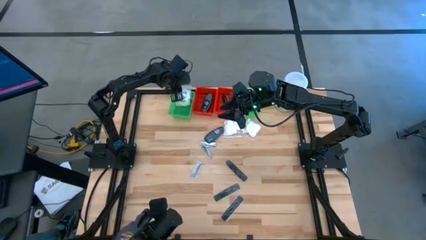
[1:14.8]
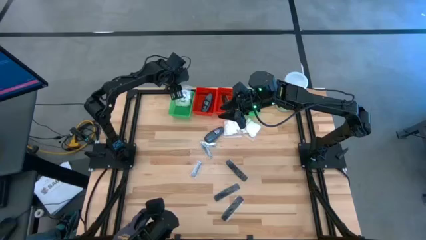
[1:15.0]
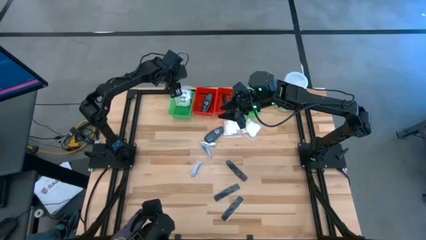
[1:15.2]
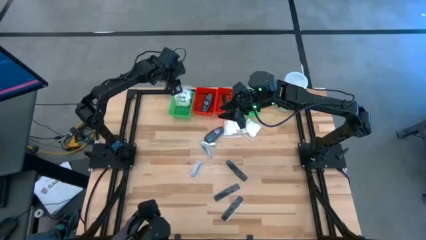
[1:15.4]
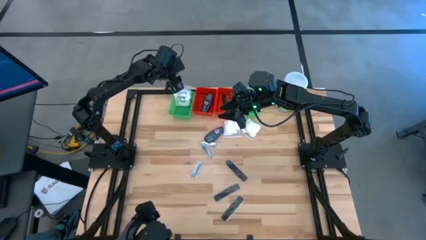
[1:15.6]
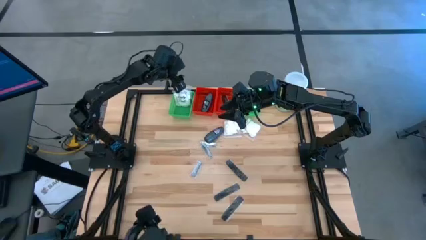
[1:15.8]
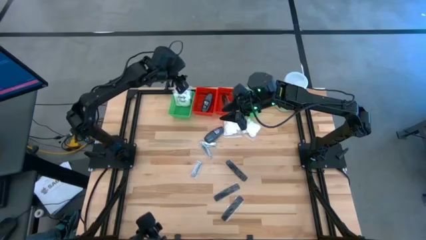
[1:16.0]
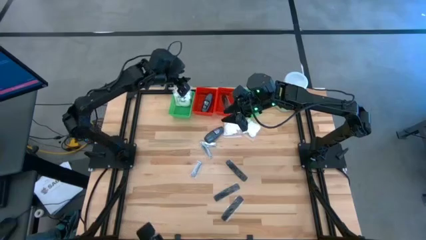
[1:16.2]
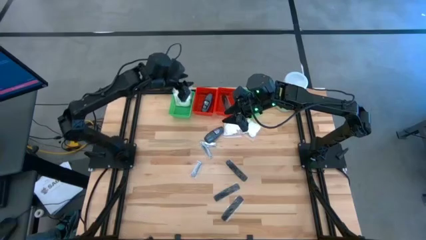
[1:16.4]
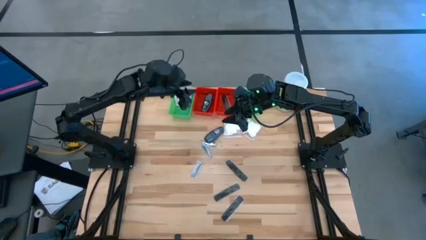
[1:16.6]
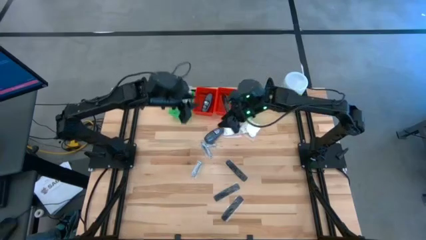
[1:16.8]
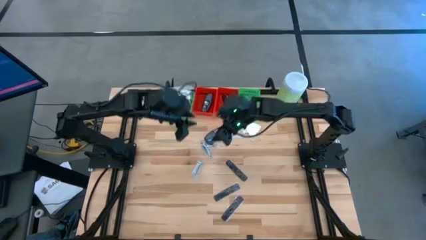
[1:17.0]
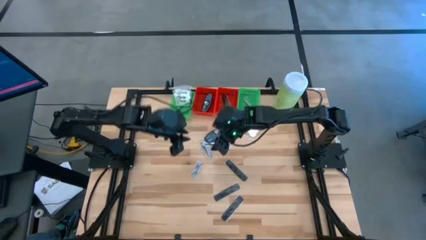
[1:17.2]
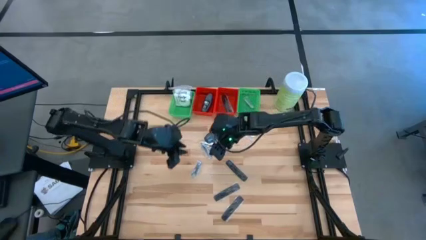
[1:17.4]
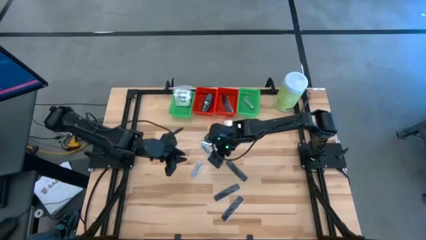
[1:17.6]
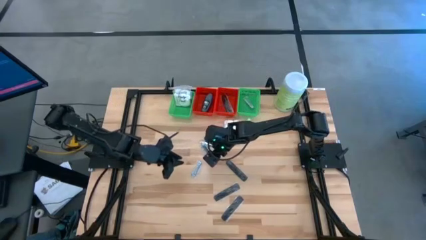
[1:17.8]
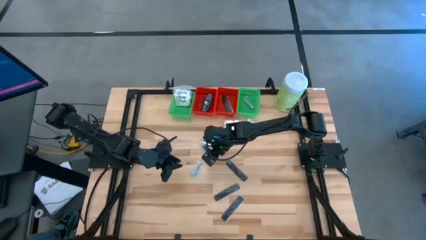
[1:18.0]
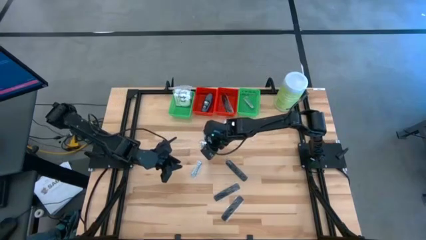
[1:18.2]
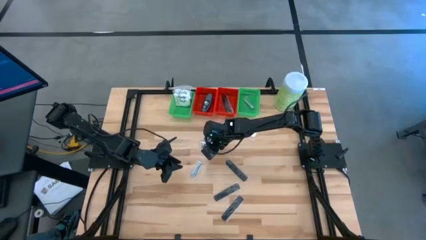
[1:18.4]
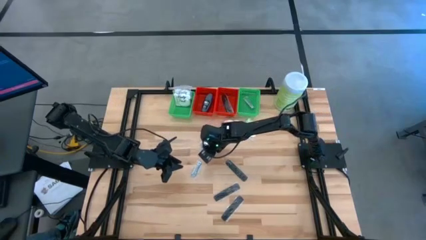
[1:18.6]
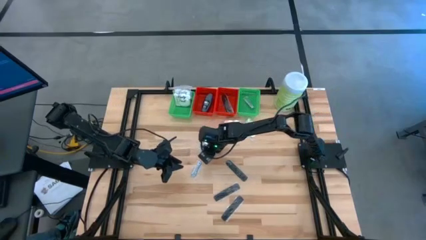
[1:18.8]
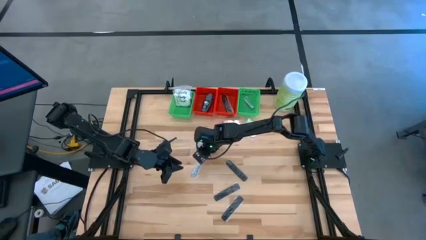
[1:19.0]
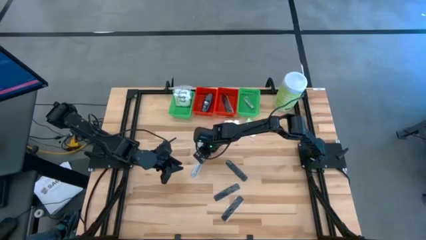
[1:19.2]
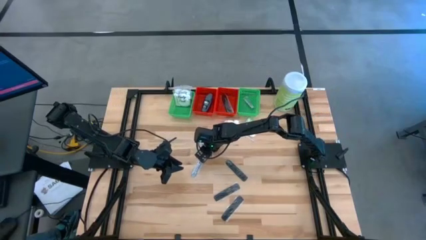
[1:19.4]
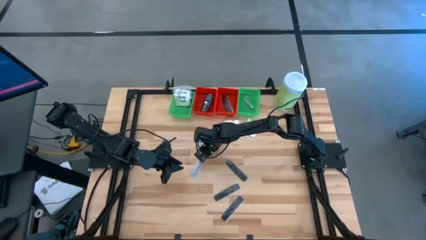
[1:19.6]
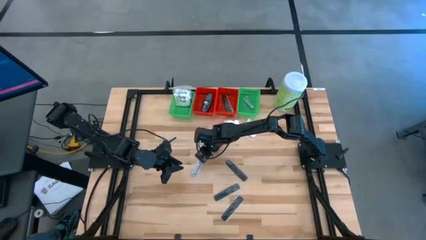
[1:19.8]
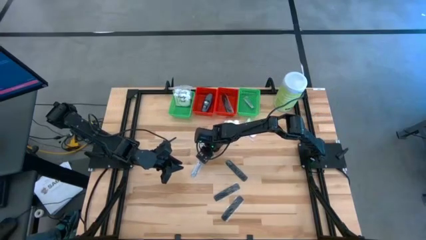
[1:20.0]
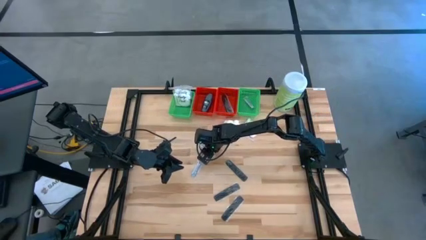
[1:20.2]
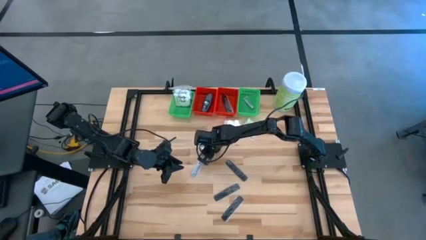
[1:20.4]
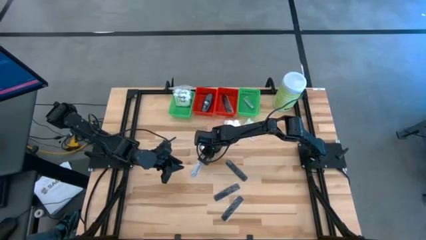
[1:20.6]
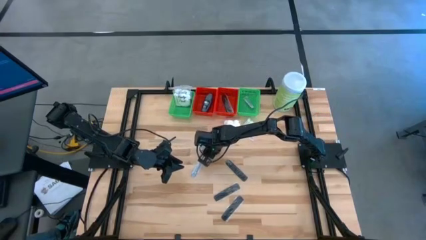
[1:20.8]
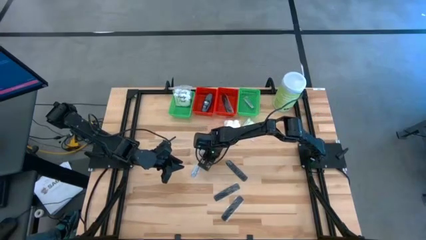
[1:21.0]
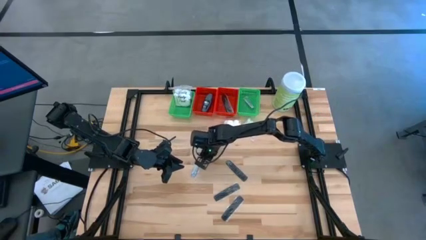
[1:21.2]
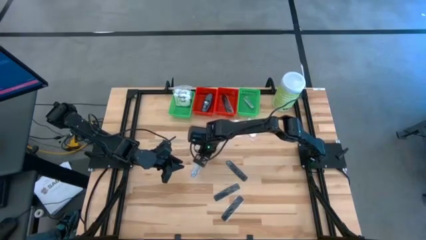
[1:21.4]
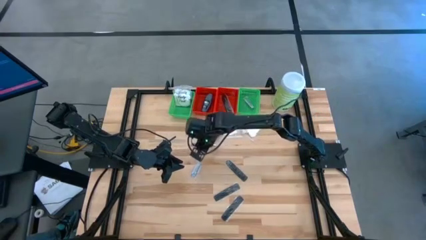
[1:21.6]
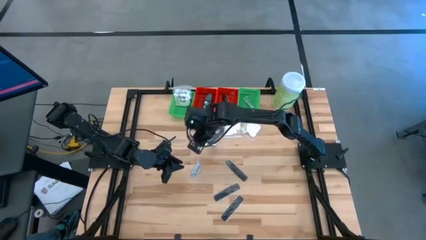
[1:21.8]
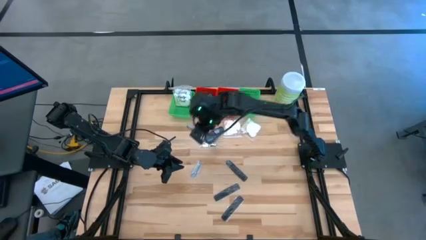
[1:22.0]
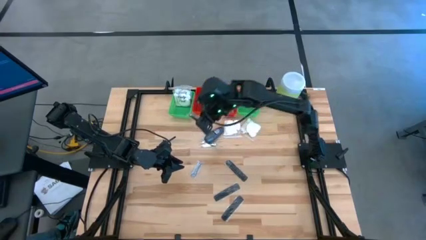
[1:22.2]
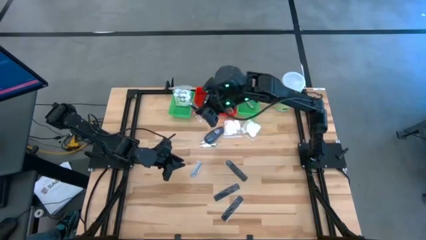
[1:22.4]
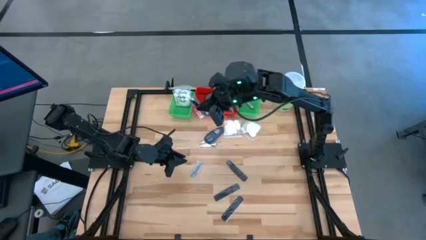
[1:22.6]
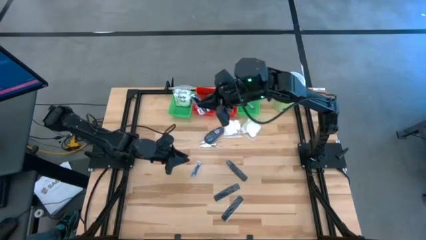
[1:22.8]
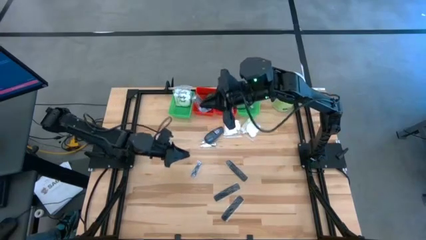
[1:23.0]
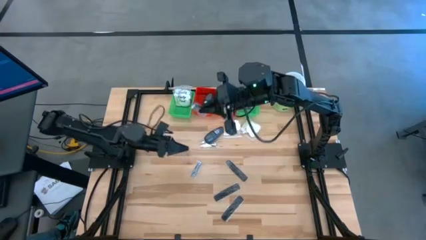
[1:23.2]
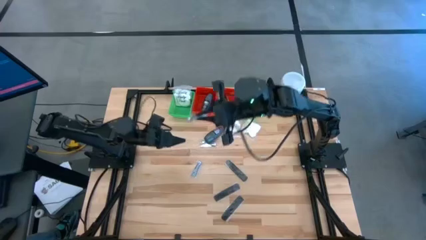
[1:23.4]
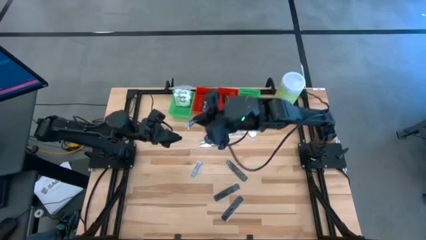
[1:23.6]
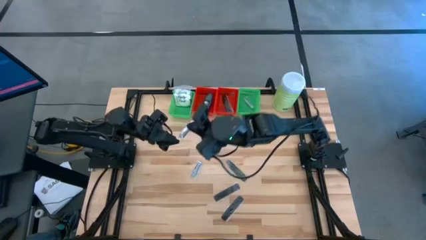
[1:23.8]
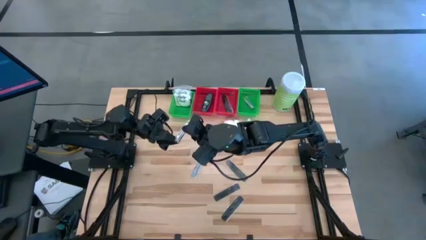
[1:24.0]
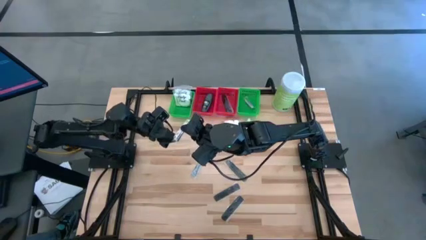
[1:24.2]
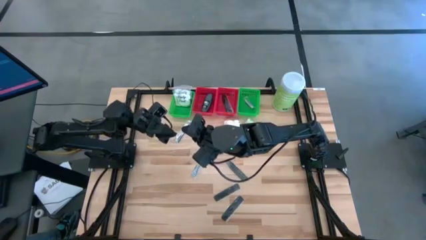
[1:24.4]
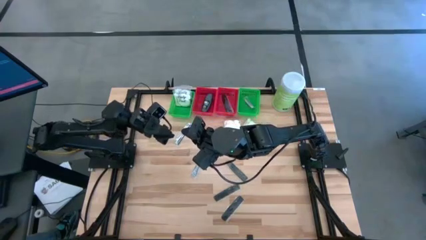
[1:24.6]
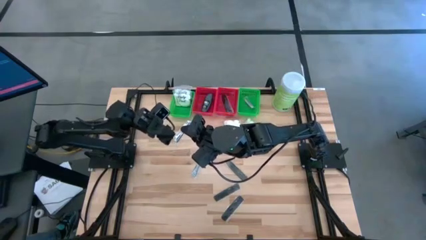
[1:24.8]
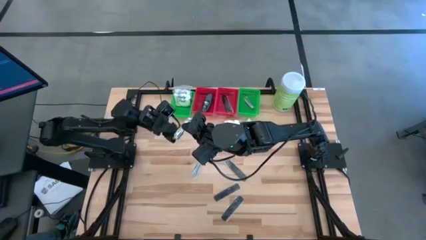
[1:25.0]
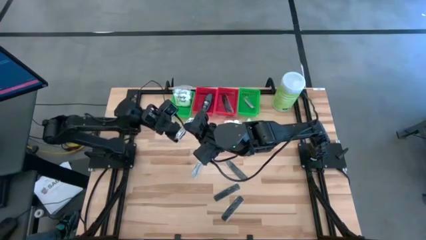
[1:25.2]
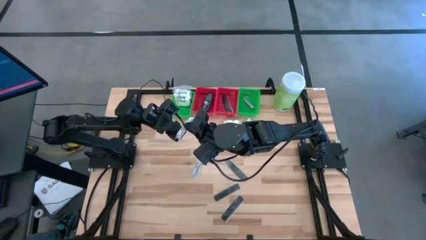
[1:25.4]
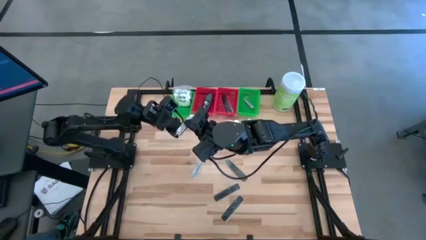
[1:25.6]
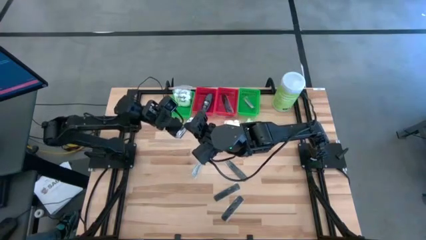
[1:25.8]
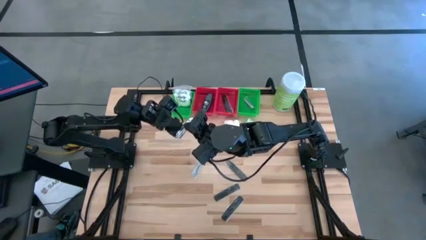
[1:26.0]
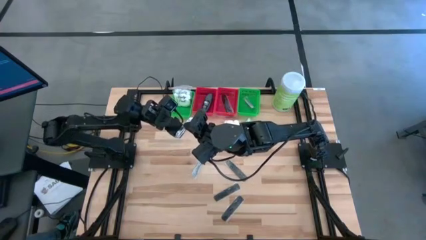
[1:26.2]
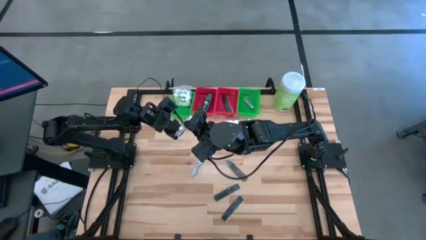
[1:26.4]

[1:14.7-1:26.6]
Task: Pick & Place Travel size toiletries
Put the nail cutter into the right green basket

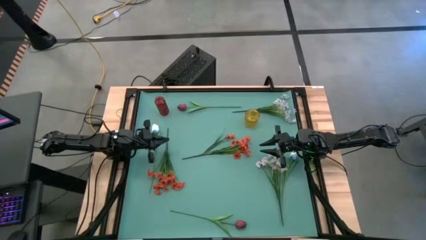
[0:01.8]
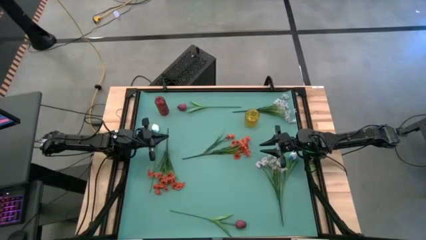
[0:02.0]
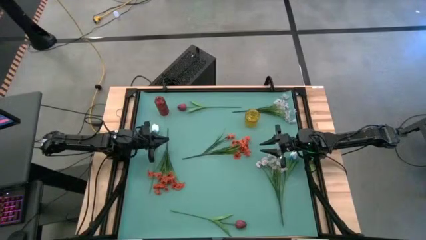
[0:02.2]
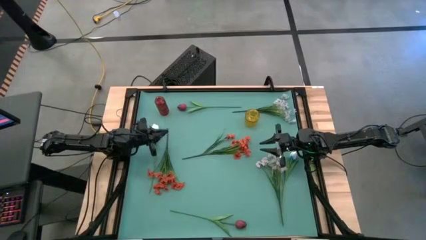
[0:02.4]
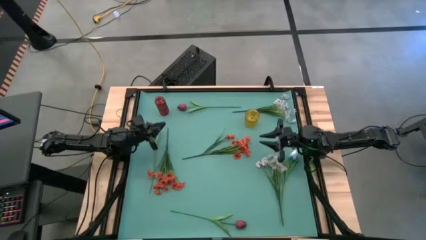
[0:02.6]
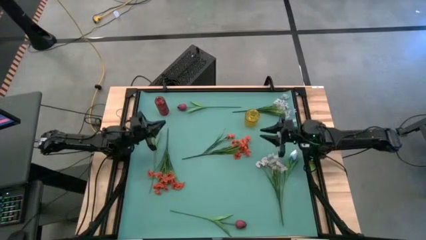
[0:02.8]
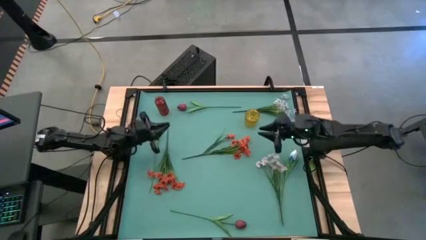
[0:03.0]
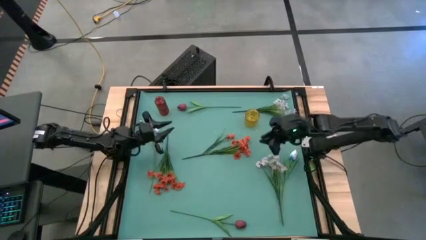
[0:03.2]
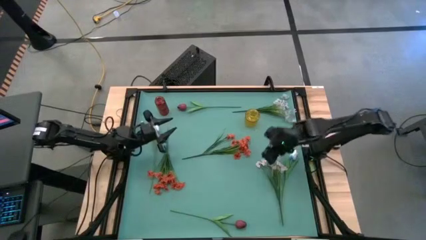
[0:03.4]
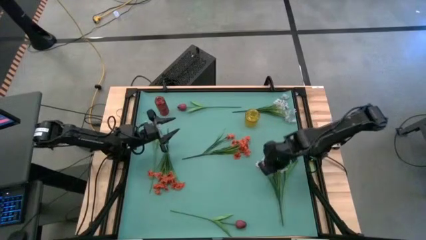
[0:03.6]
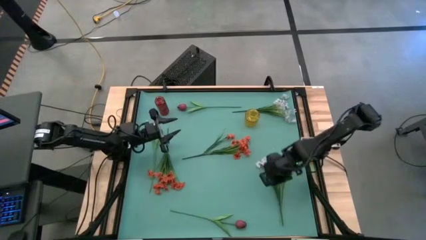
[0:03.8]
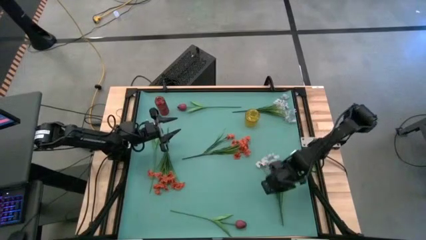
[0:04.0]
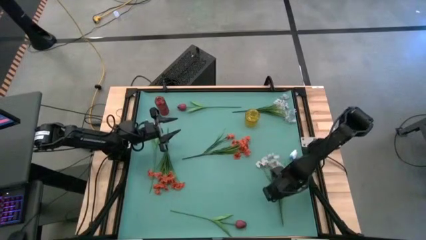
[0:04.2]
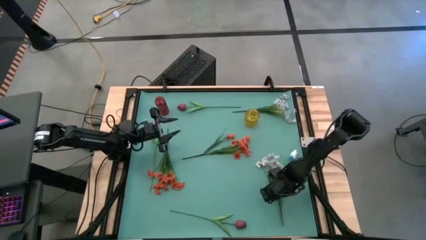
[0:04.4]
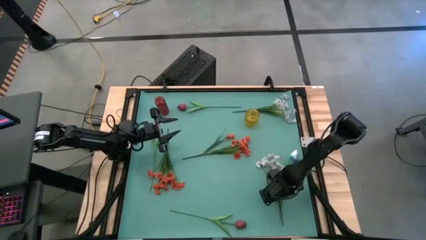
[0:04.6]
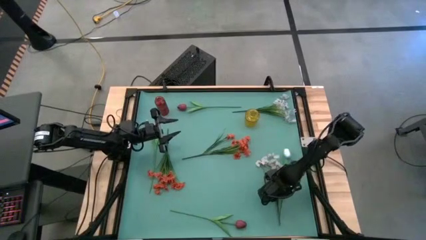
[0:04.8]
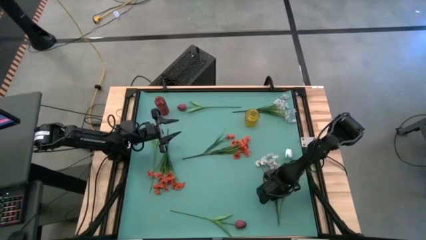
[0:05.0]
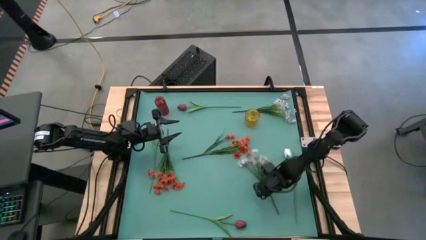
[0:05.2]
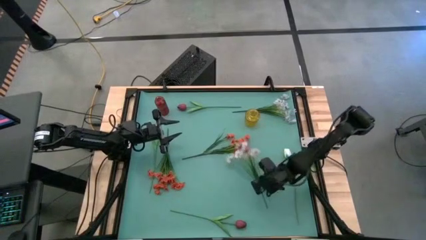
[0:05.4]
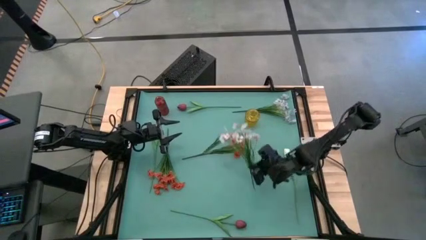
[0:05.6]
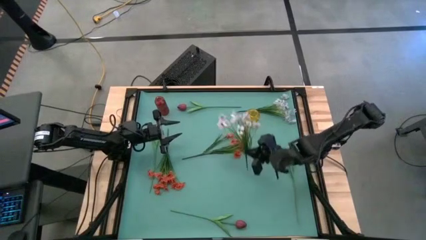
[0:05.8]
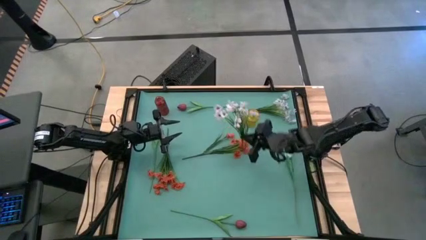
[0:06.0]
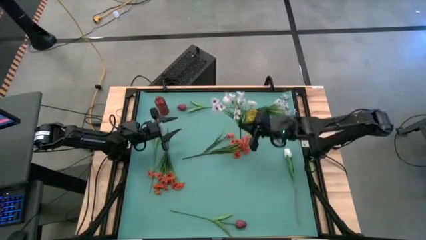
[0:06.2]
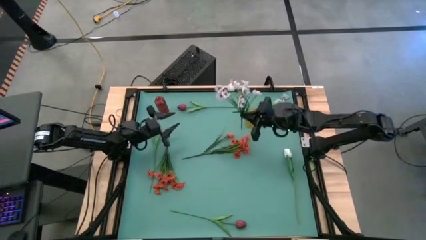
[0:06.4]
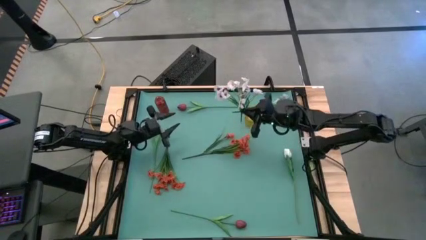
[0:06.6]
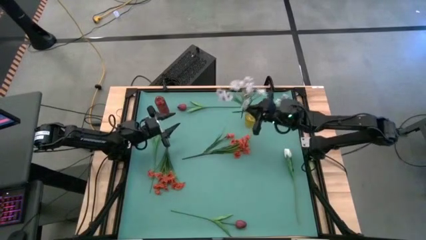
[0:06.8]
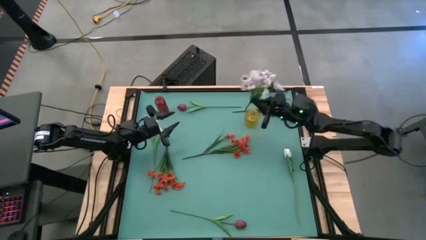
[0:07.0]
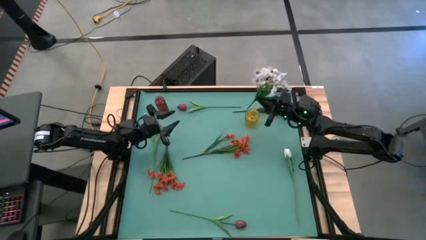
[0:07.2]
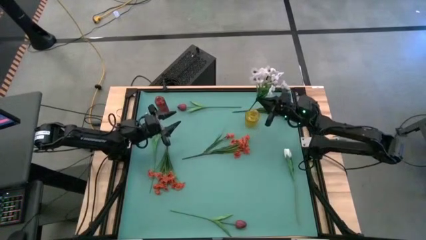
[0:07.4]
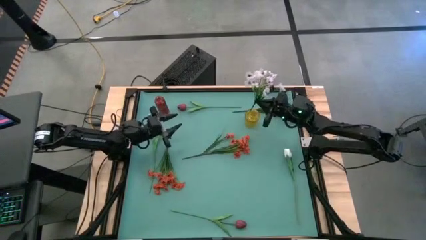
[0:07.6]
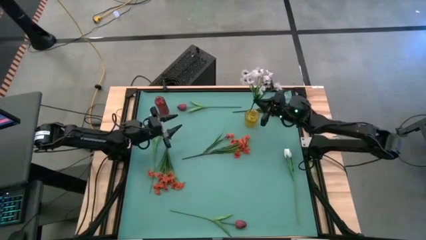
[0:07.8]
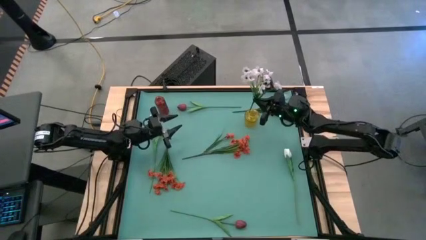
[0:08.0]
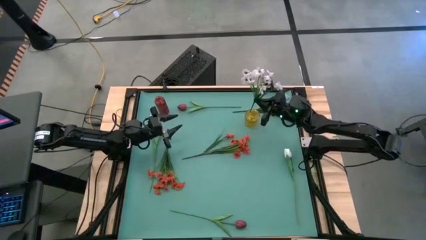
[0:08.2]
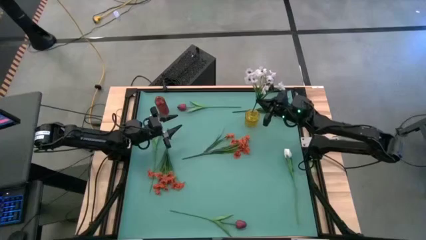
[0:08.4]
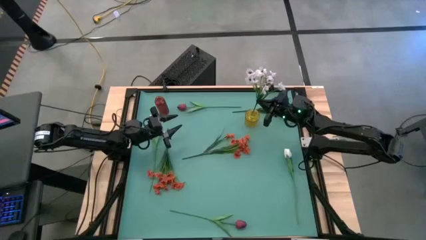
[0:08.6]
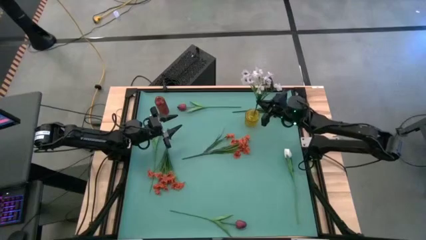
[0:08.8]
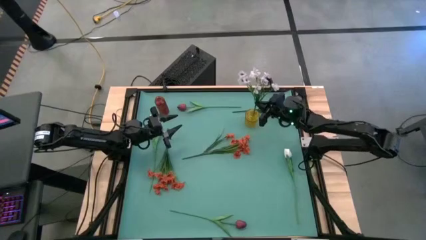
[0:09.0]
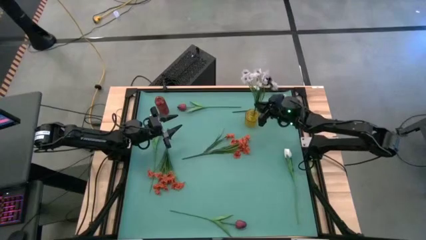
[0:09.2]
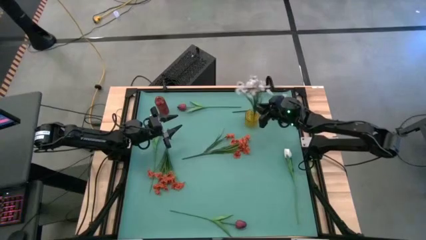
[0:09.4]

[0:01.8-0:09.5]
Task: Sort flowers into vase by color
Put the bottom white flowers into the yellow flower vase
